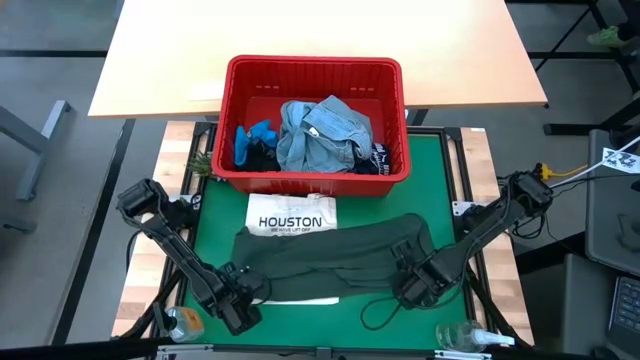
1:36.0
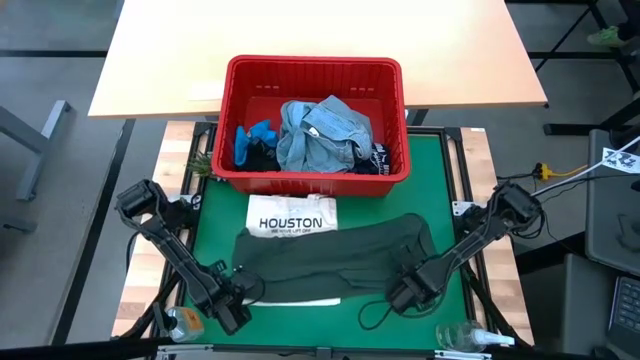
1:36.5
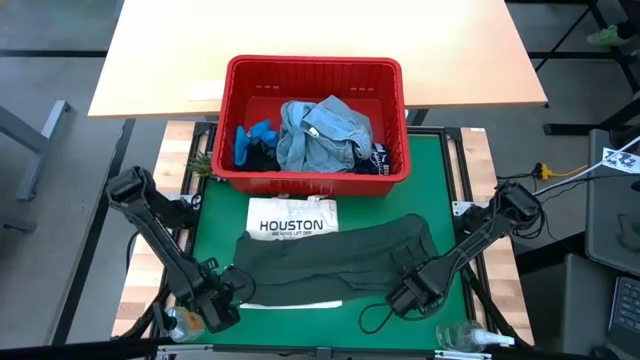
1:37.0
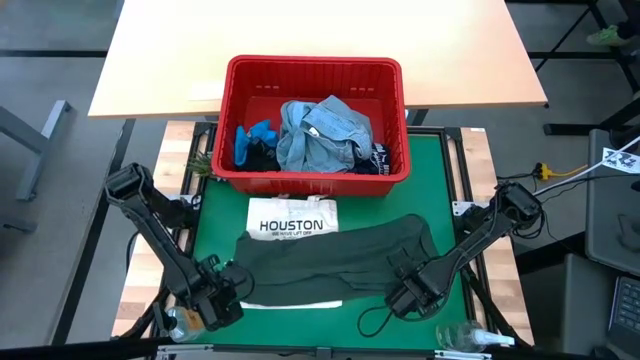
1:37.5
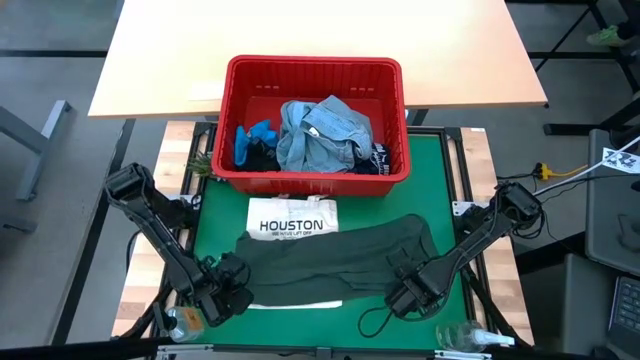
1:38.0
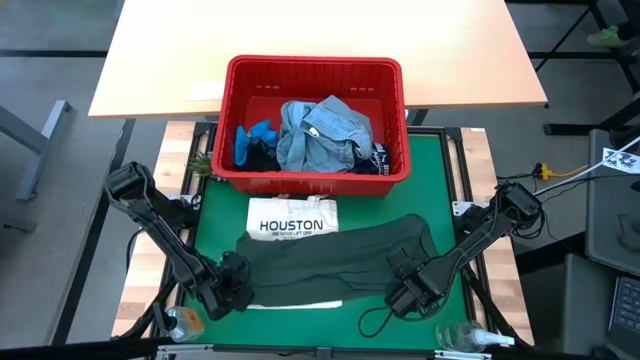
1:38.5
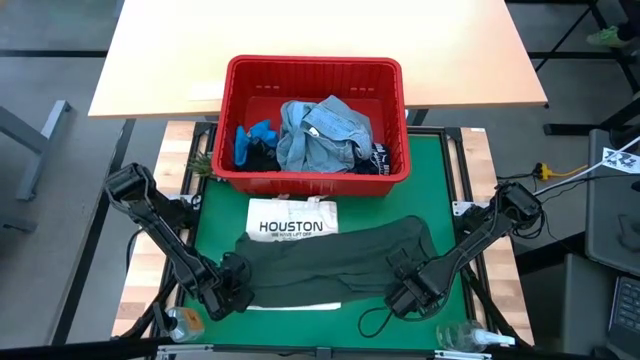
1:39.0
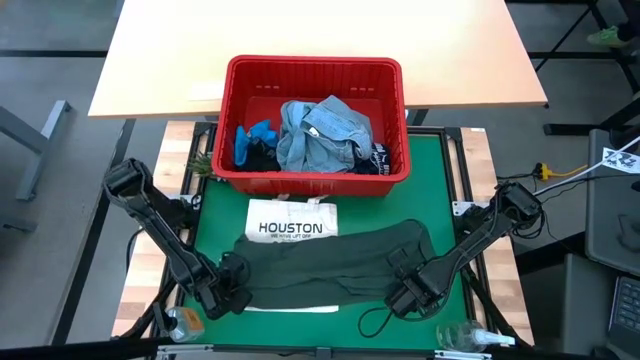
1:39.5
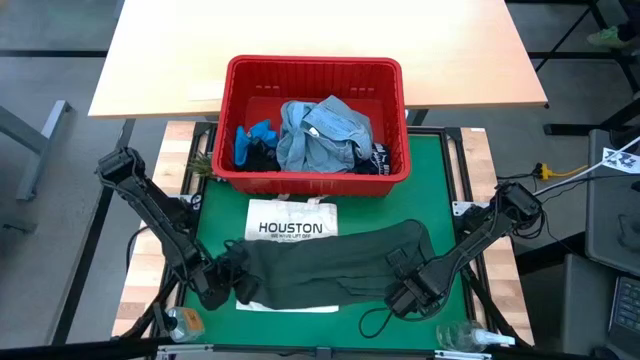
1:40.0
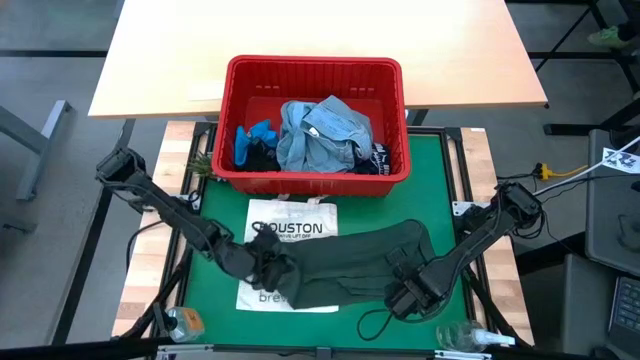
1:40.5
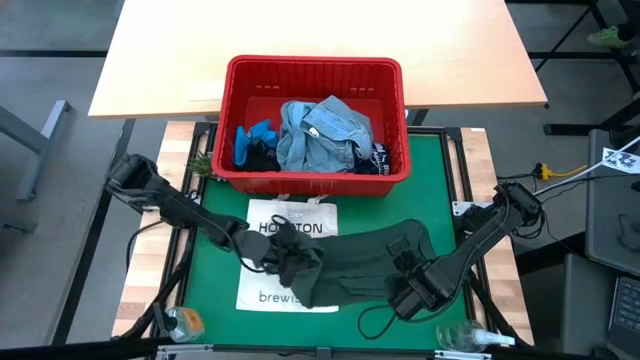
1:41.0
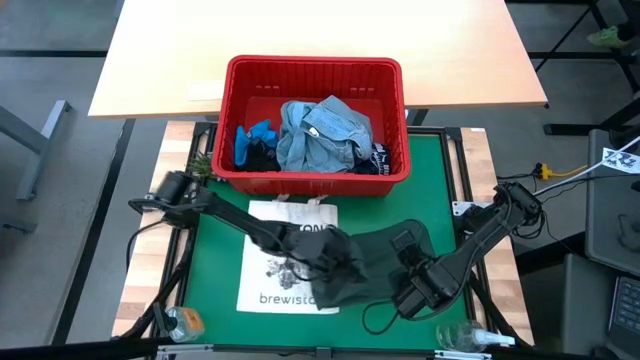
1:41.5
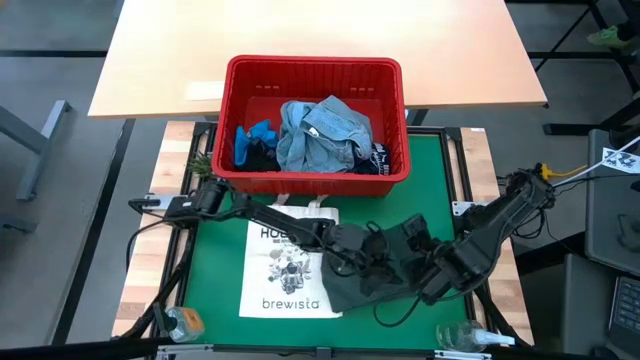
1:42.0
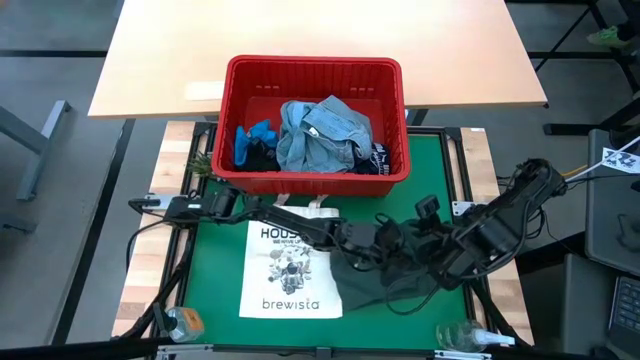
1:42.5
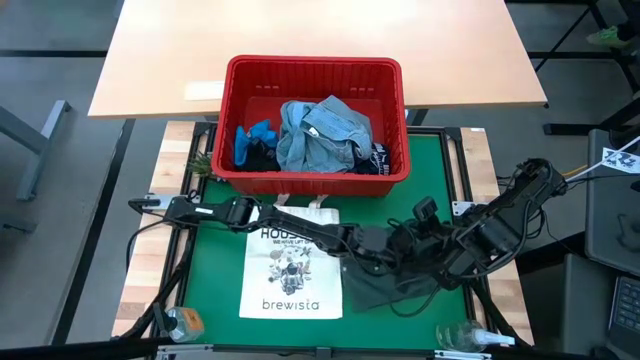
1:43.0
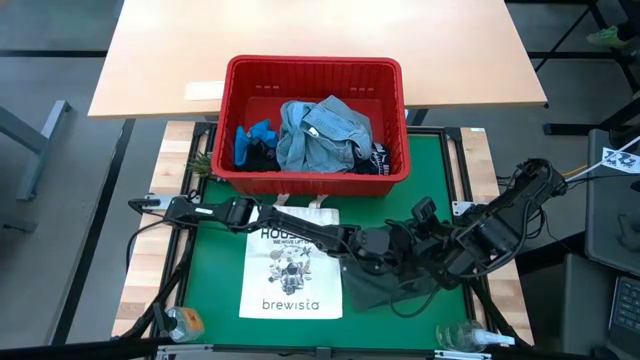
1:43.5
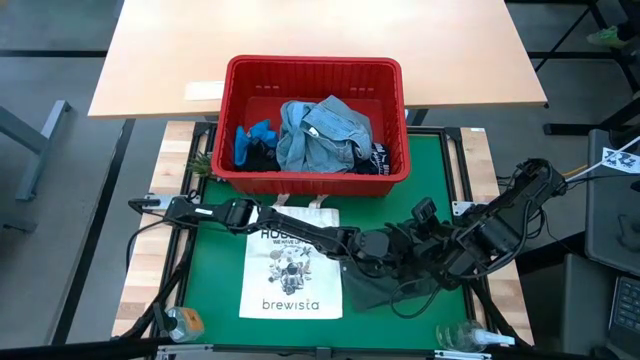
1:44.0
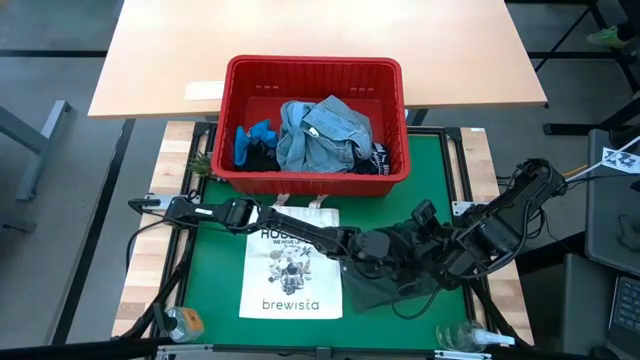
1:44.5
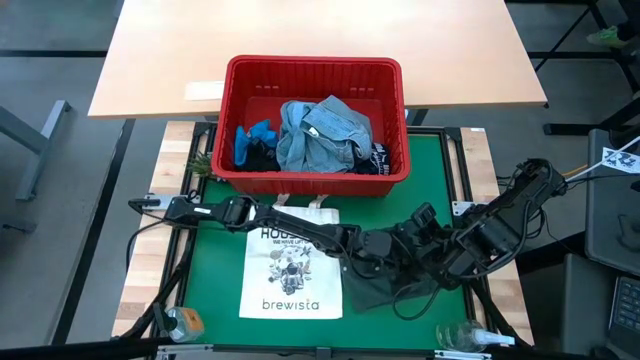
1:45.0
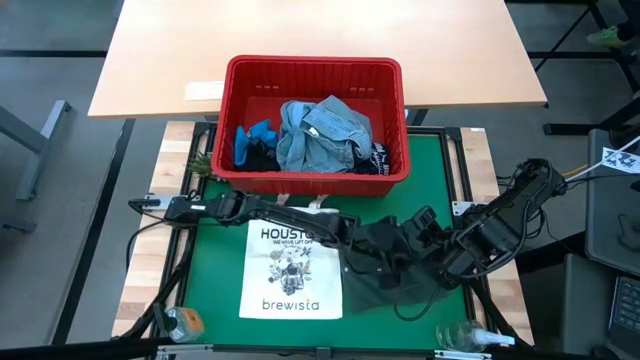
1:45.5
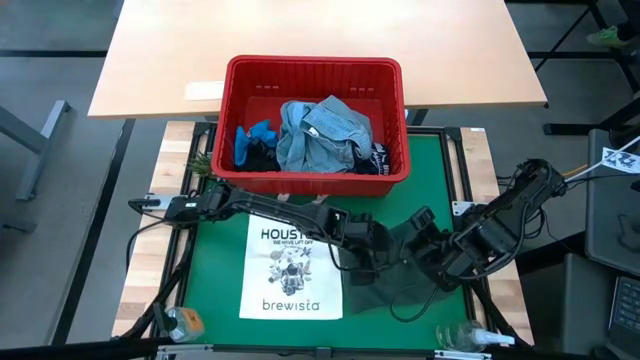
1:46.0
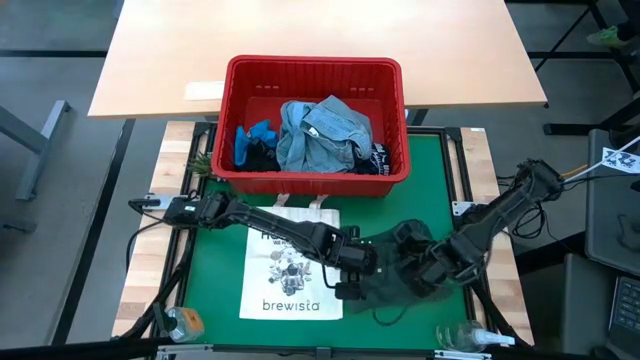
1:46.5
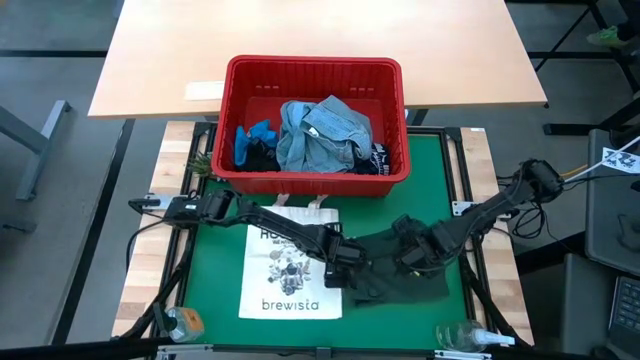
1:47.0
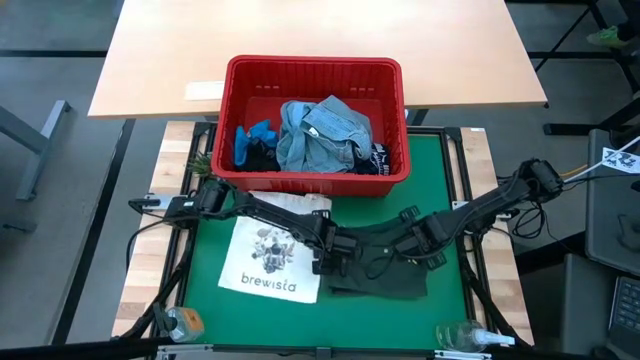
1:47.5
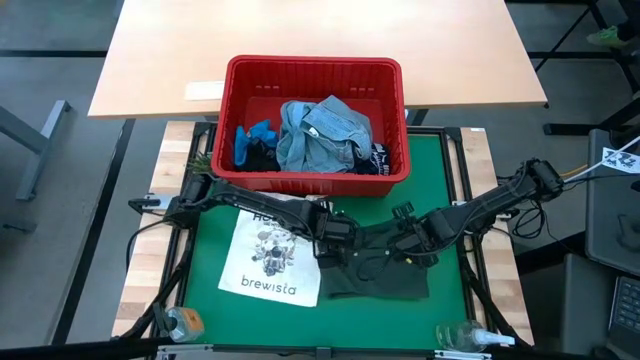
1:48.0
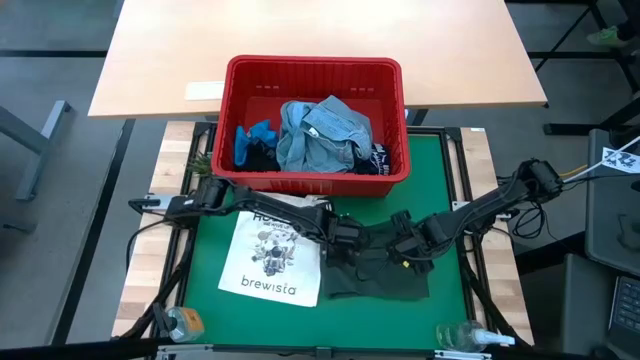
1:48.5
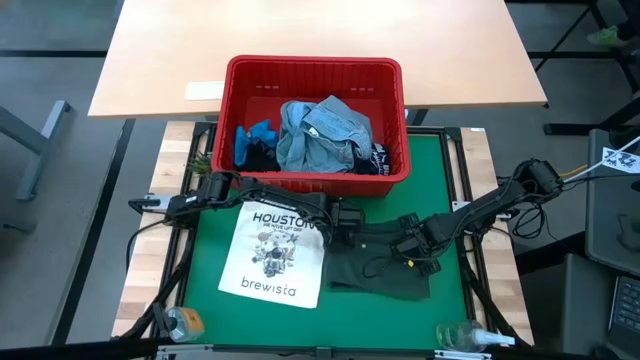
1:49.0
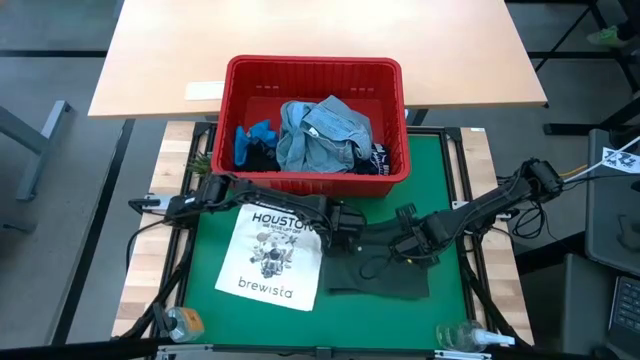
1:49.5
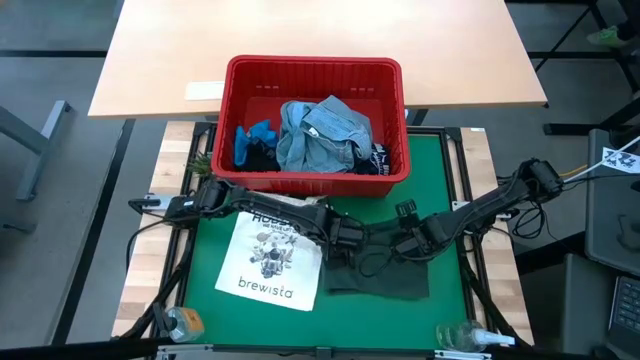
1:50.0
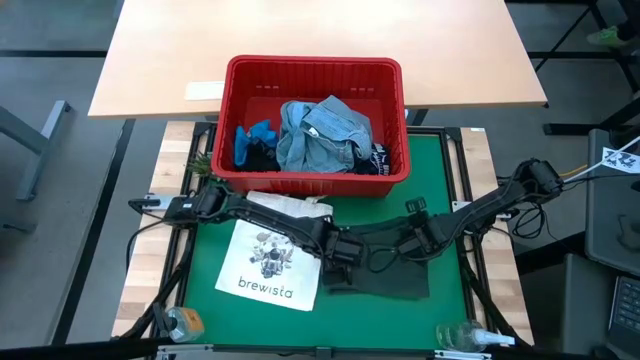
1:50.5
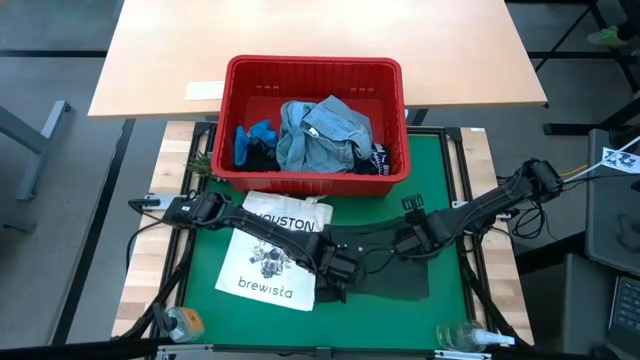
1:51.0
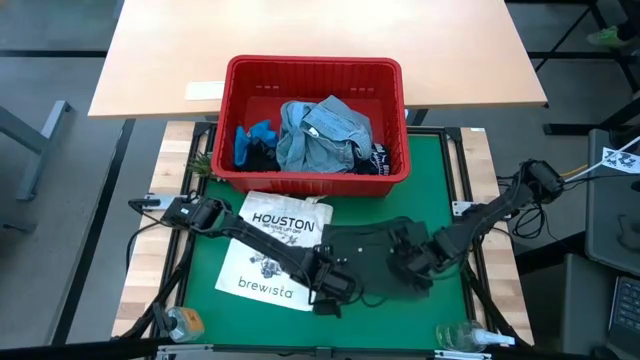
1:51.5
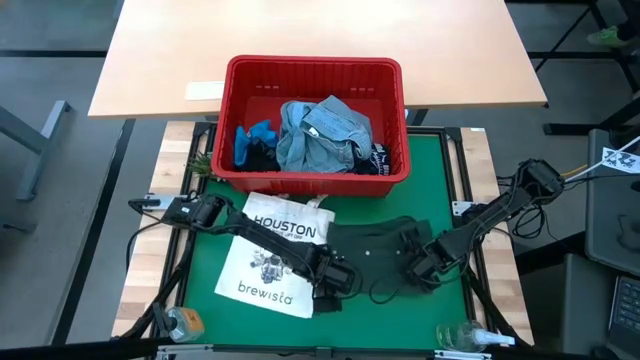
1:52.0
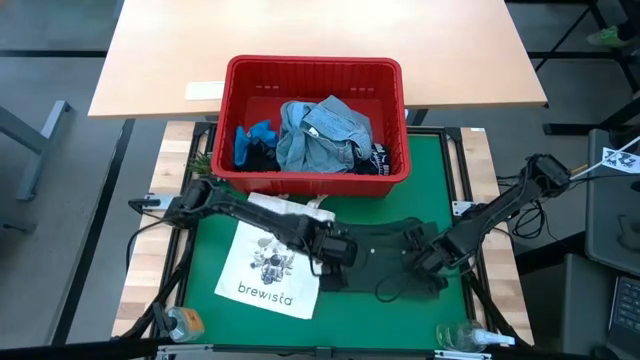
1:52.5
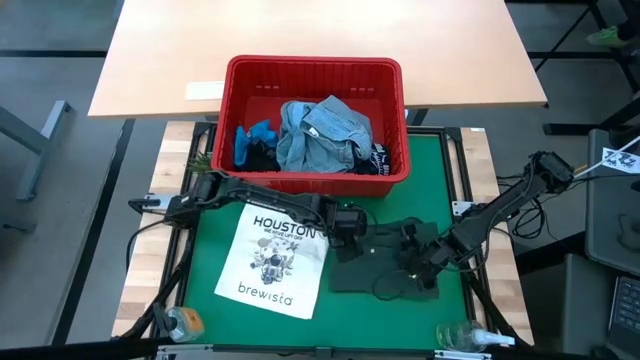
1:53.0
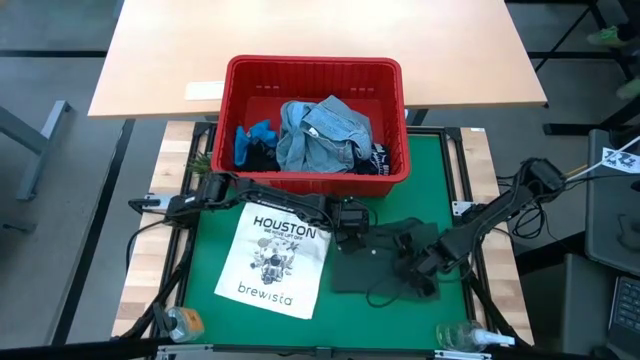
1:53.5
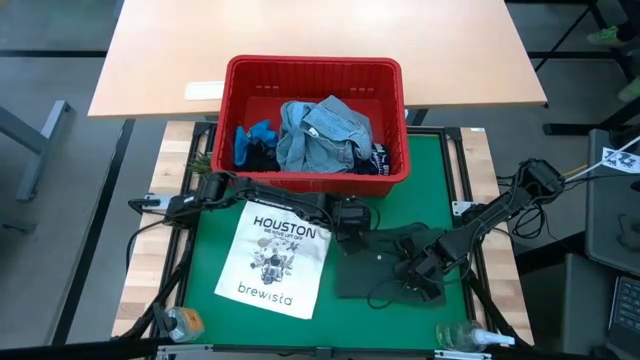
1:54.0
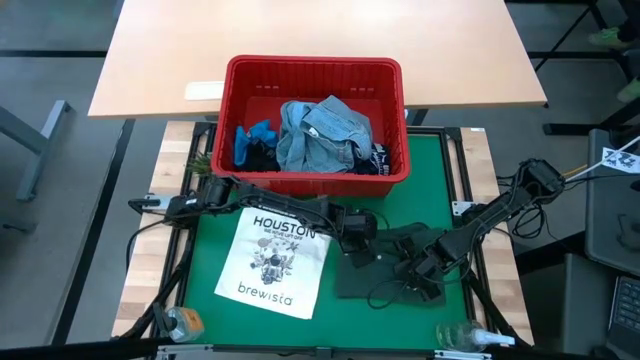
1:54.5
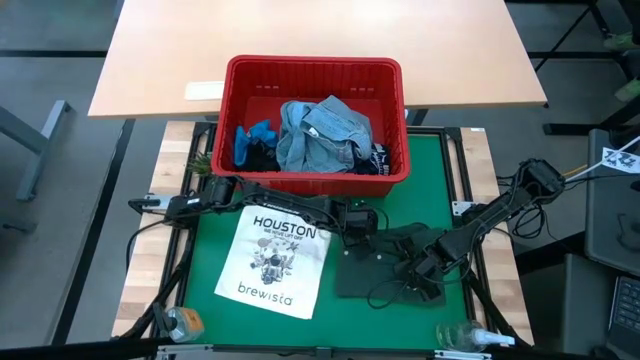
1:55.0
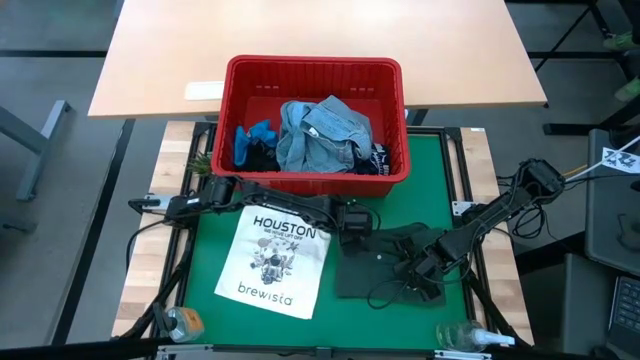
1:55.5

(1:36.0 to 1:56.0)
Task: Fold Laundry from Bin
Fold the green t-shirt
